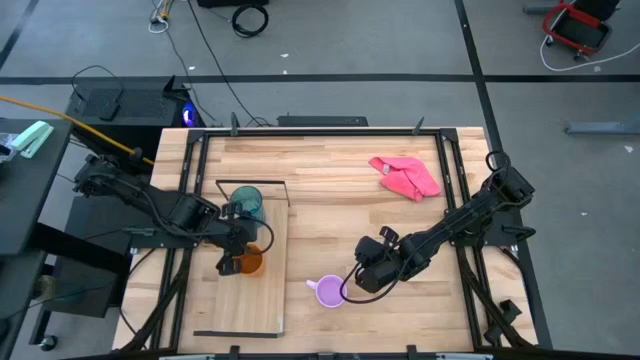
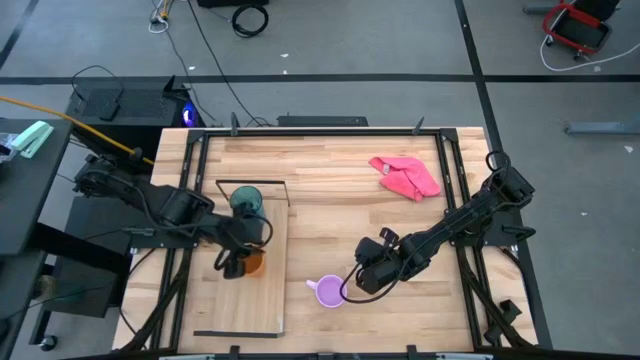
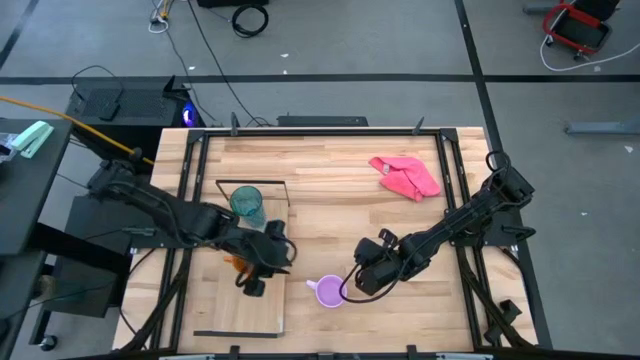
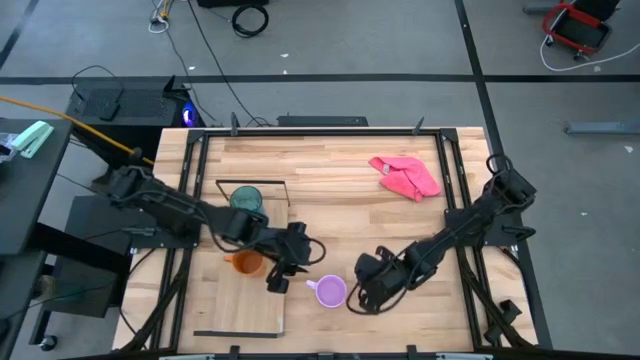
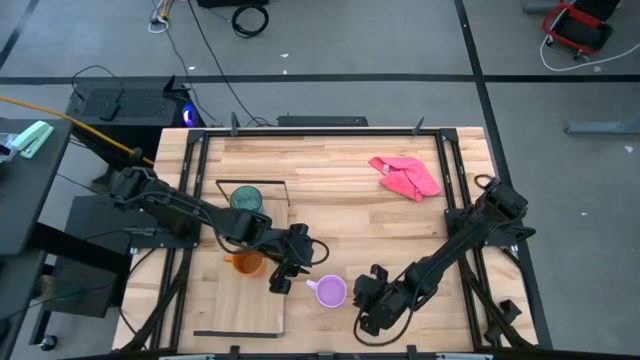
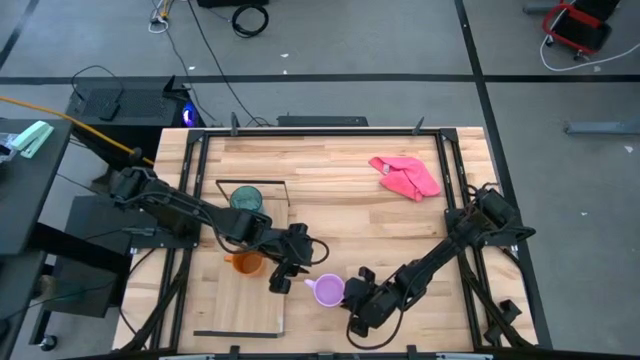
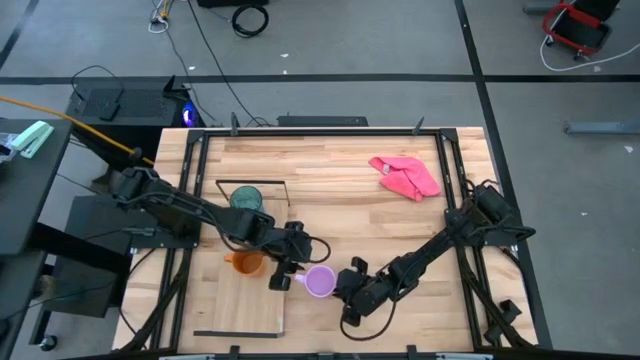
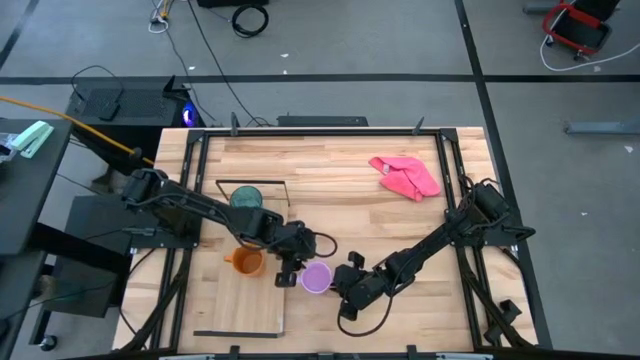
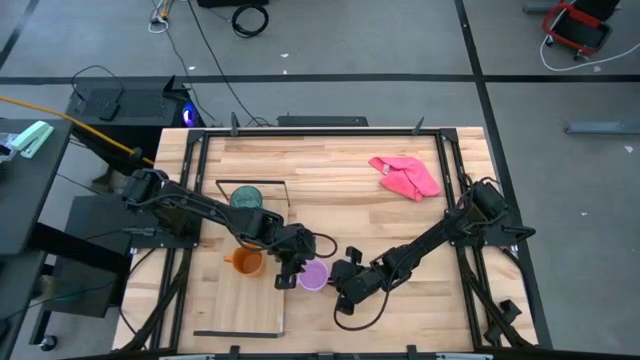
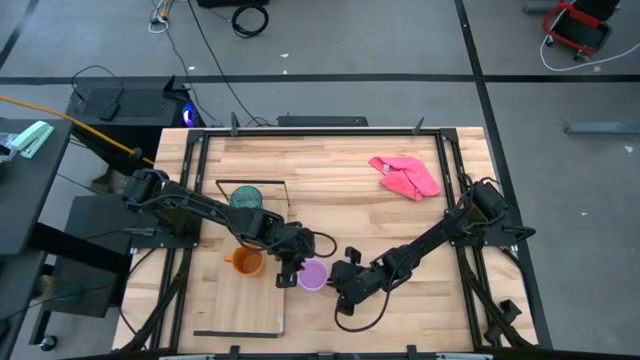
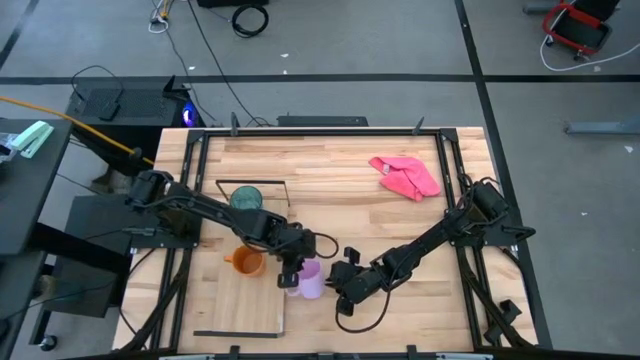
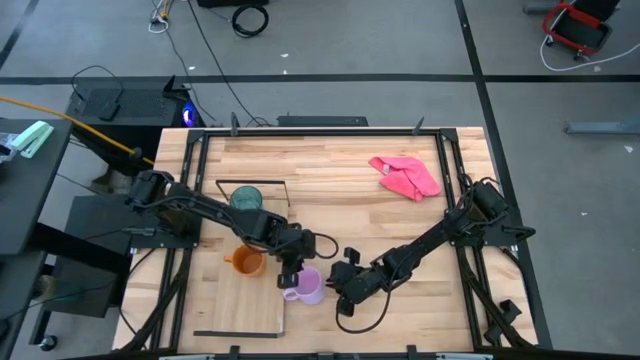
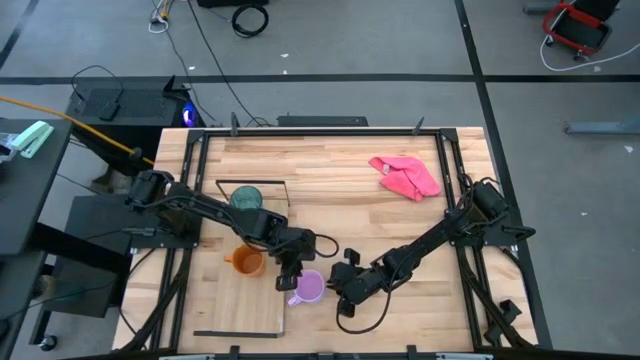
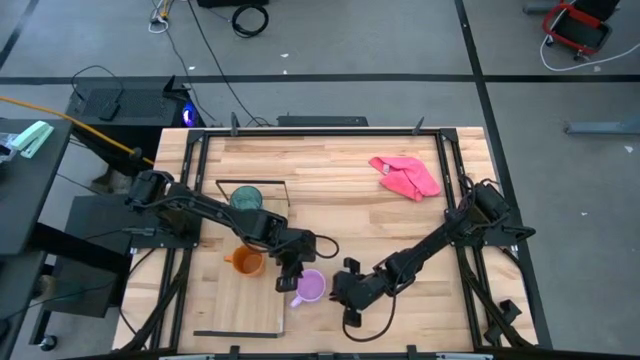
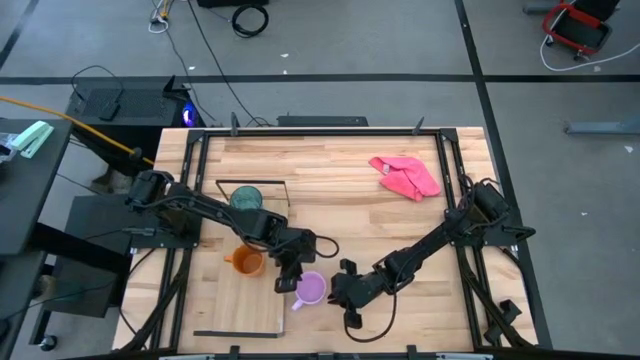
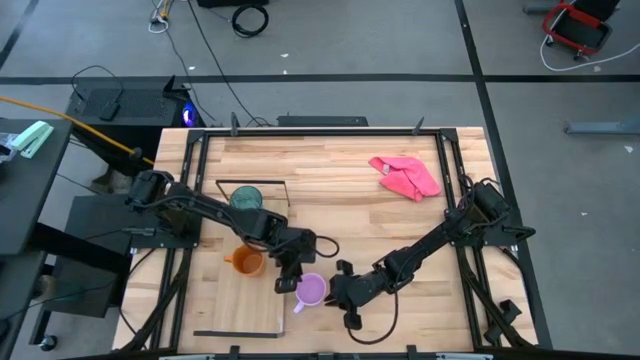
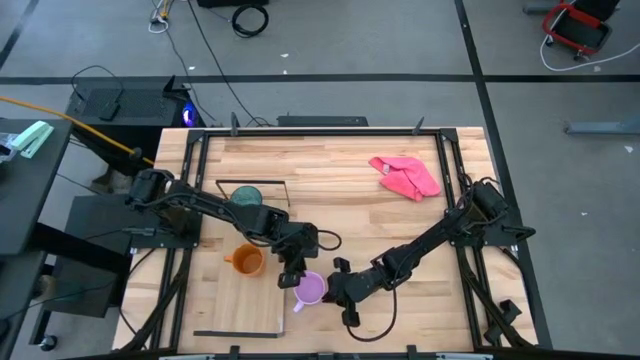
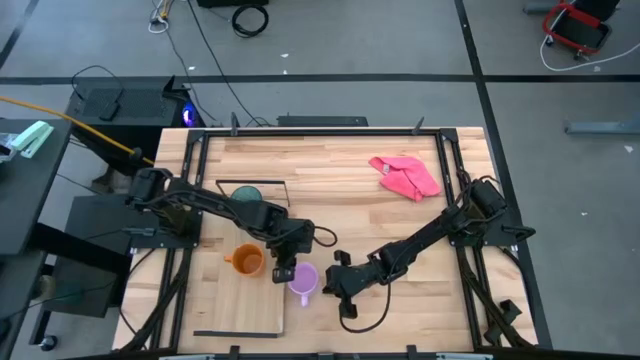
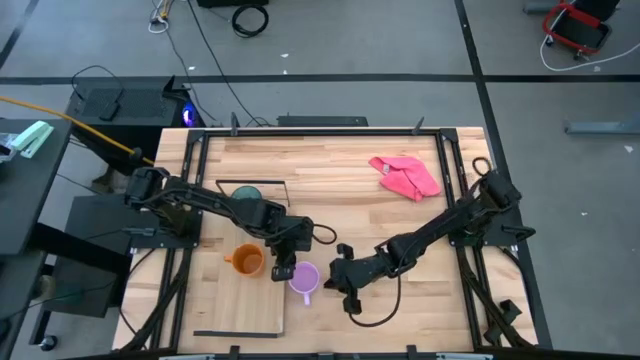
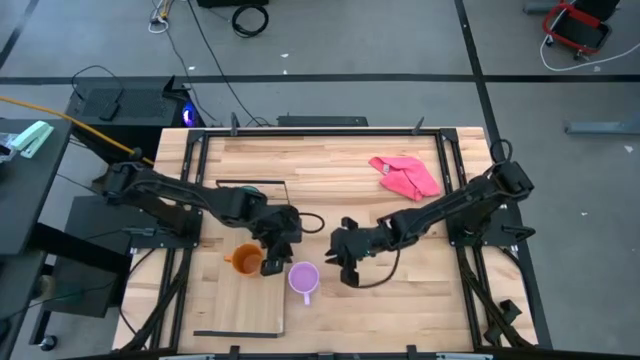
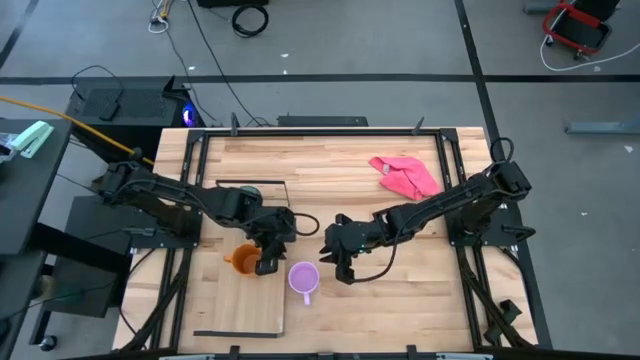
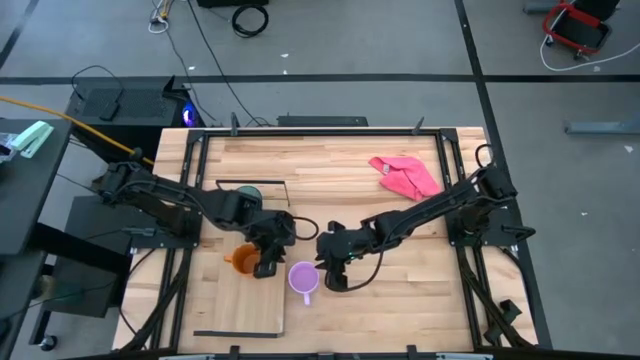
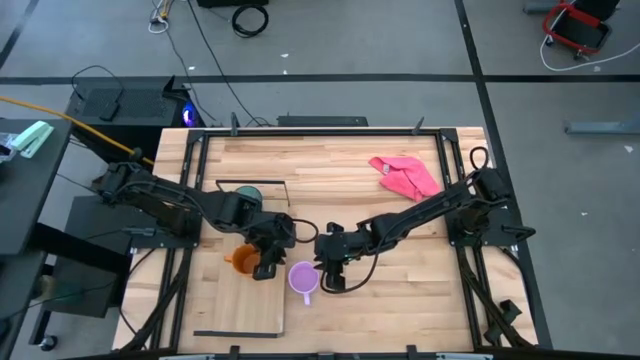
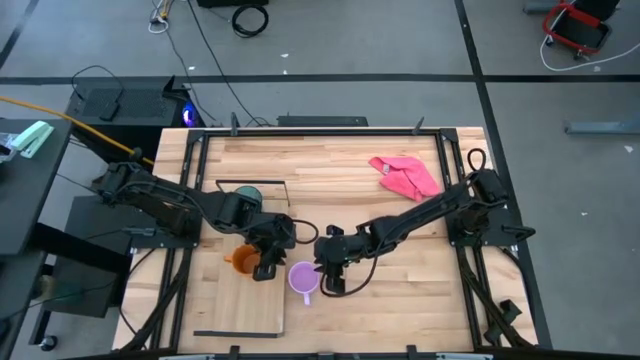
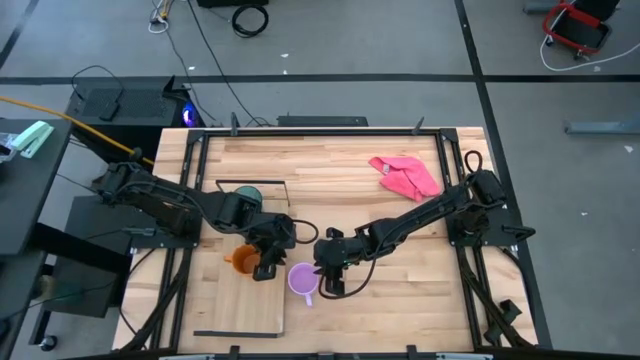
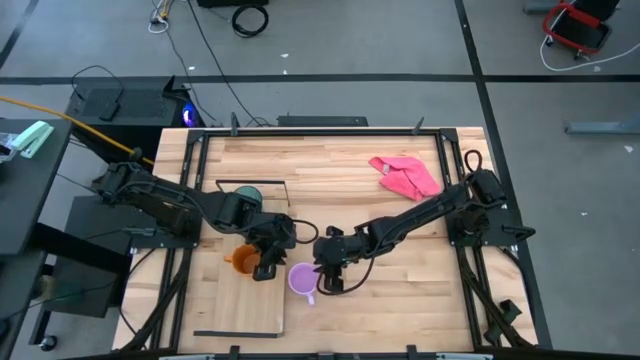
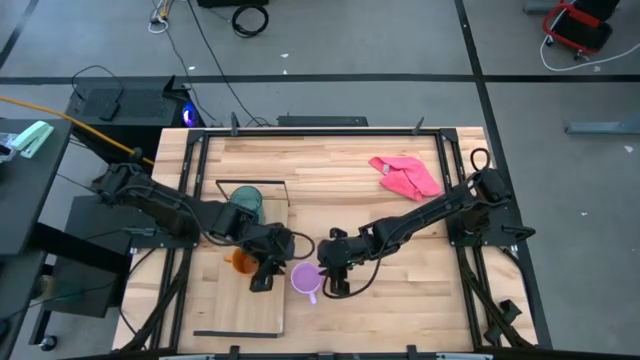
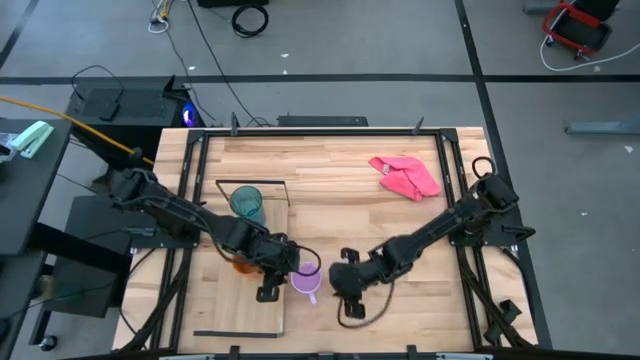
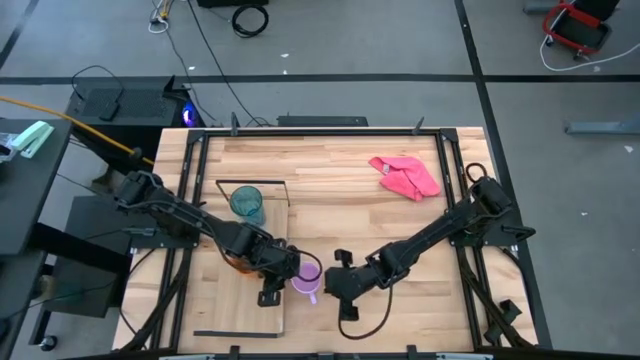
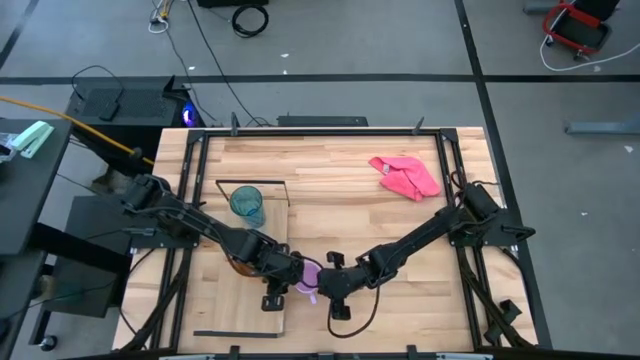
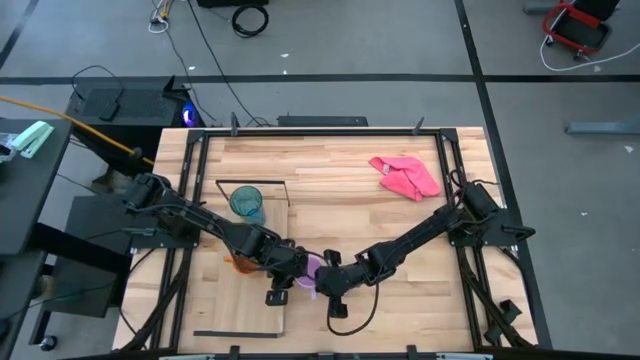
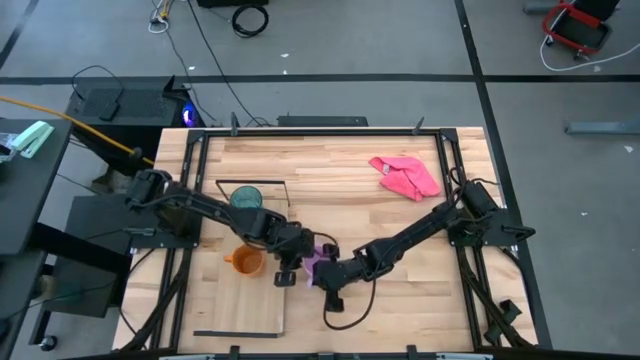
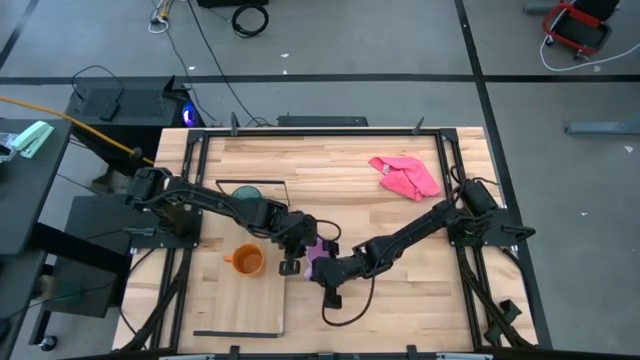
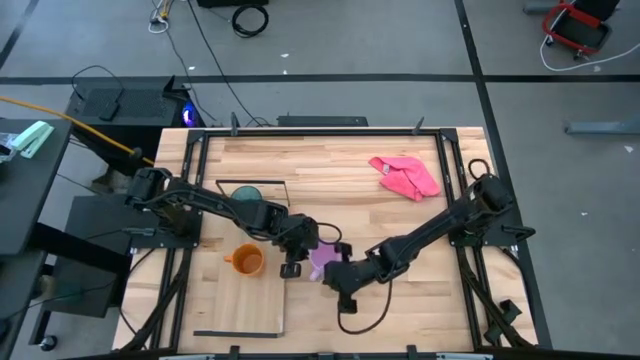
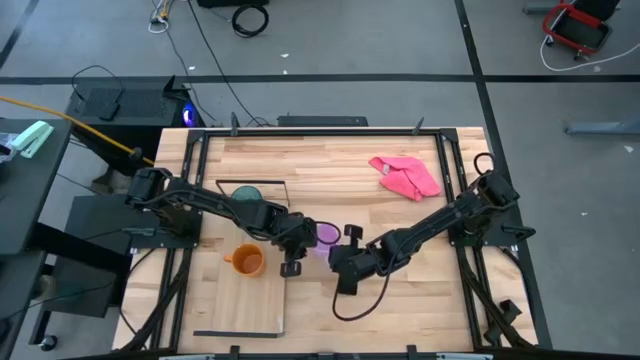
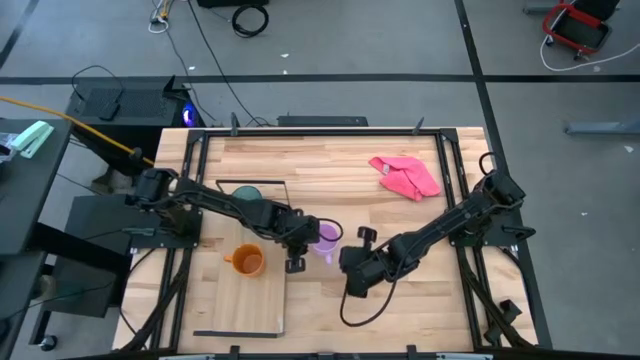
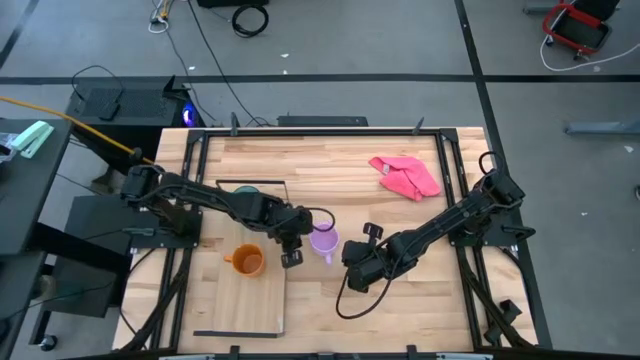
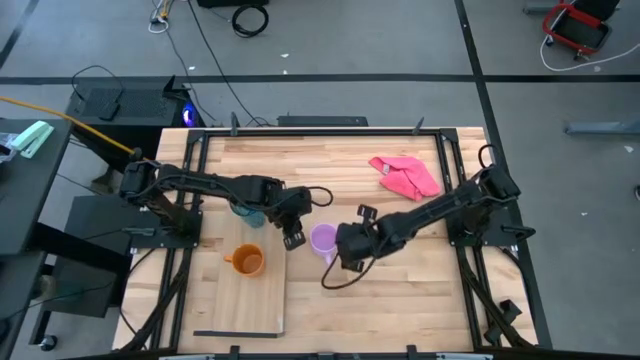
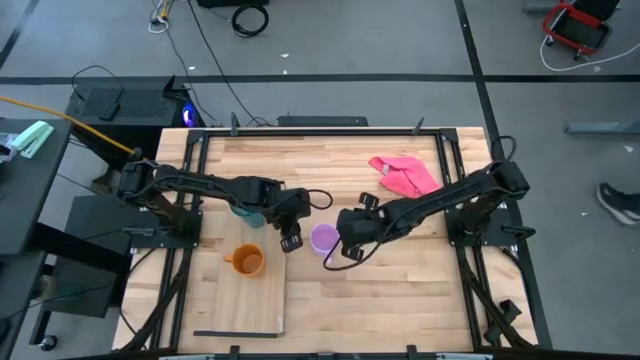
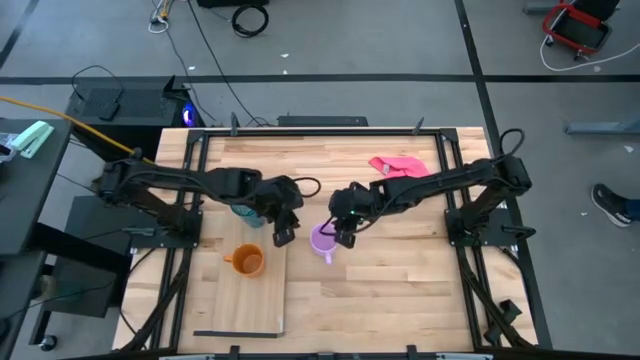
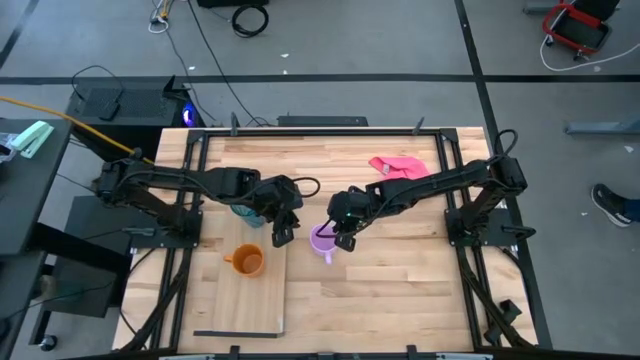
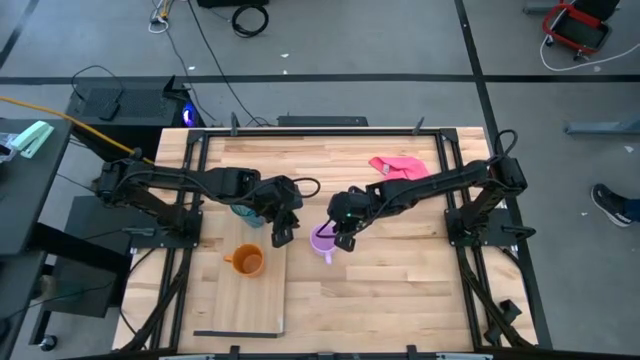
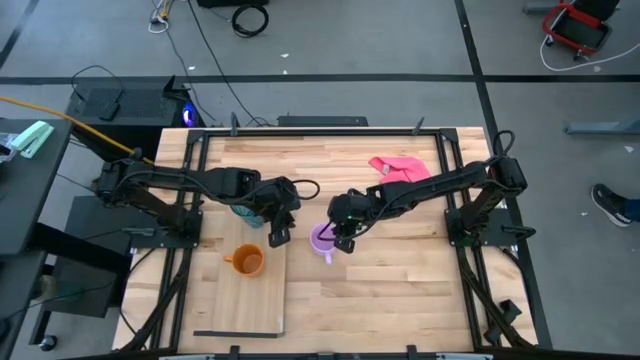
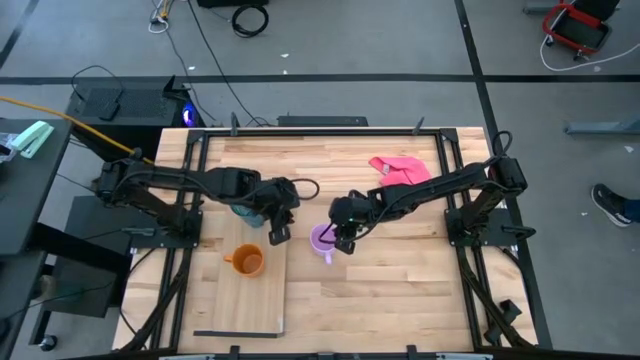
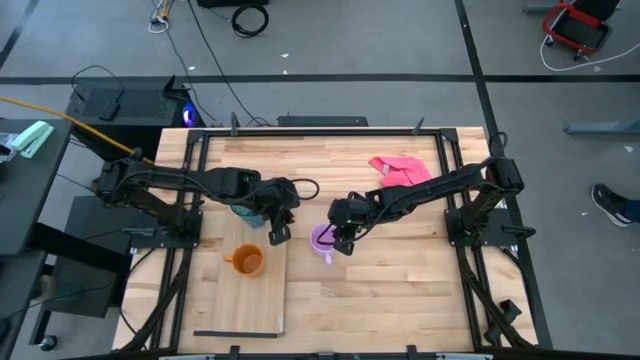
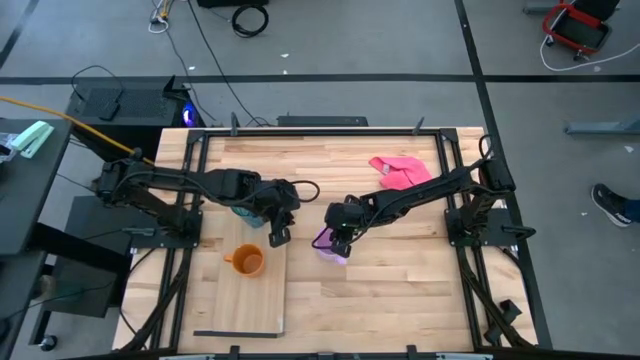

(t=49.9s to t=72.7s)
Task: Stack small to large cups/mugs on shelf
Put the light purple mug on the shelf
